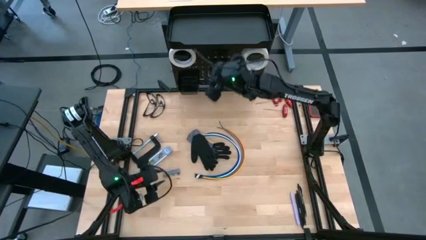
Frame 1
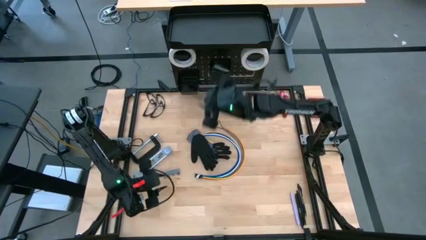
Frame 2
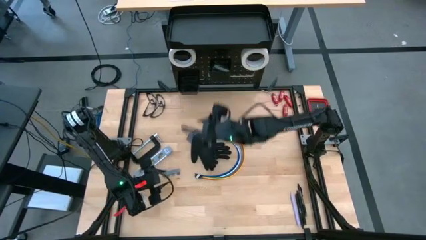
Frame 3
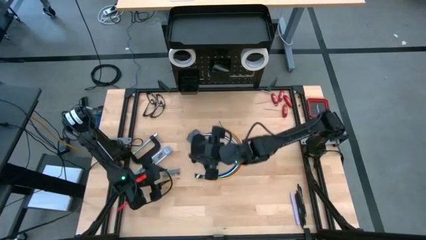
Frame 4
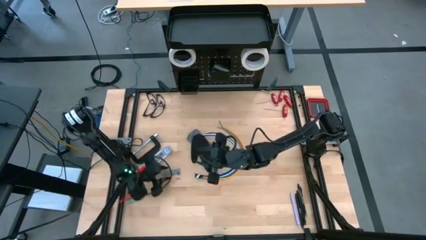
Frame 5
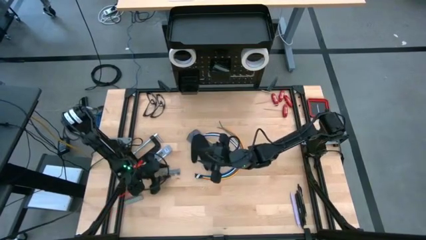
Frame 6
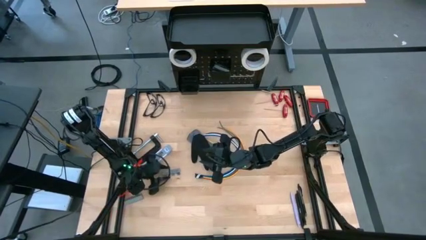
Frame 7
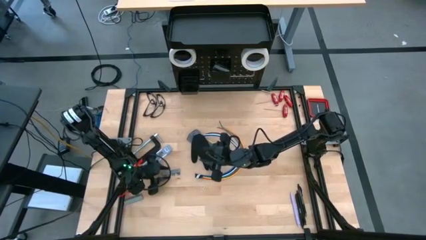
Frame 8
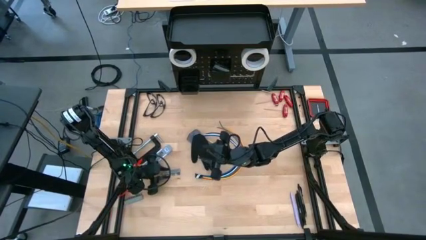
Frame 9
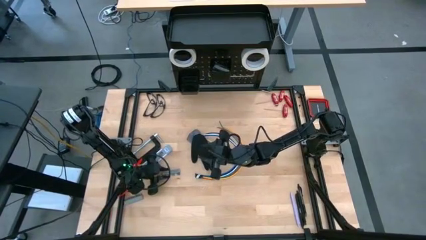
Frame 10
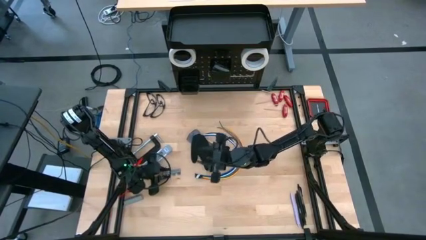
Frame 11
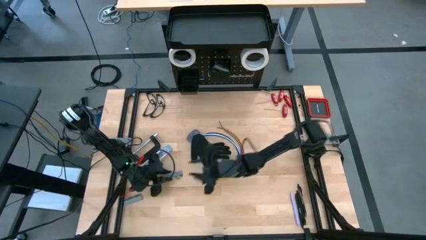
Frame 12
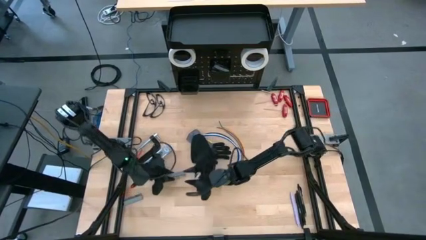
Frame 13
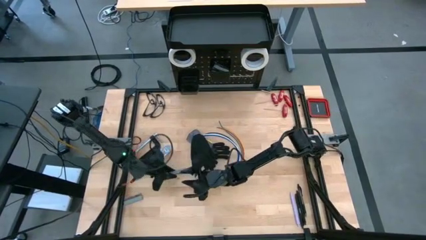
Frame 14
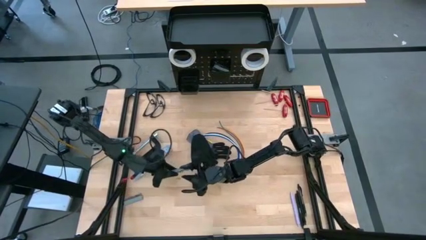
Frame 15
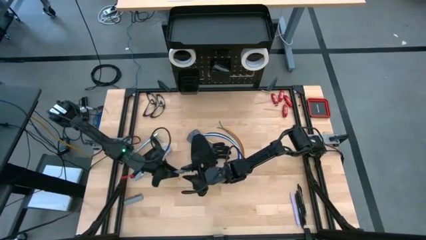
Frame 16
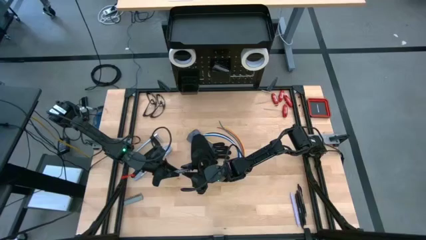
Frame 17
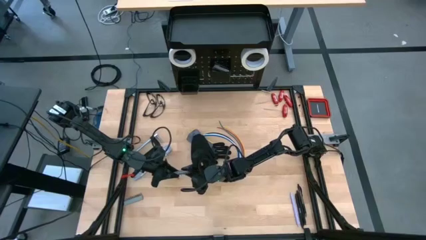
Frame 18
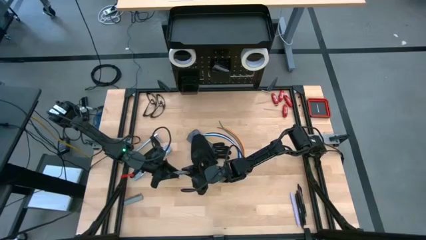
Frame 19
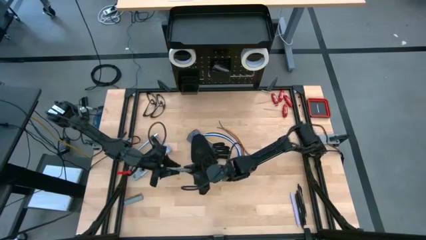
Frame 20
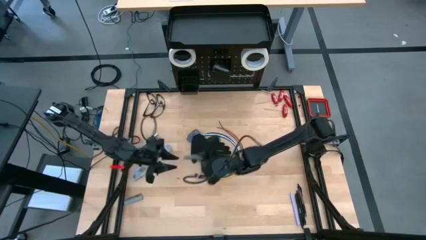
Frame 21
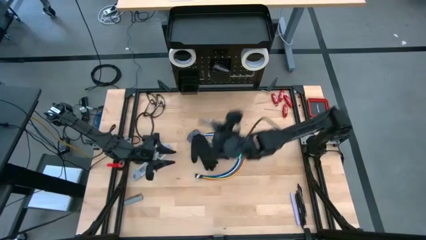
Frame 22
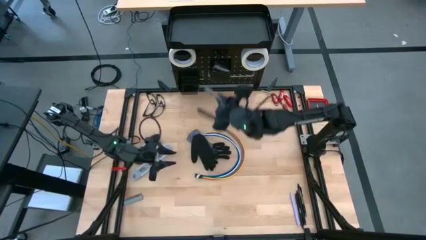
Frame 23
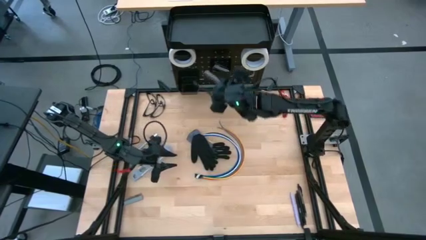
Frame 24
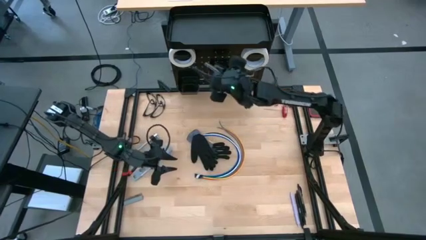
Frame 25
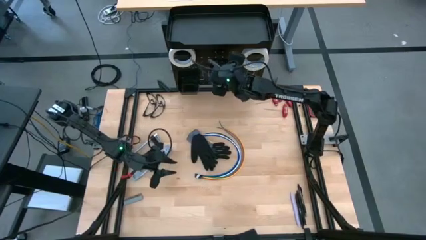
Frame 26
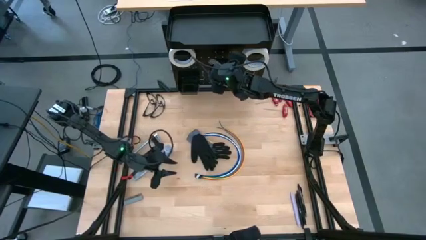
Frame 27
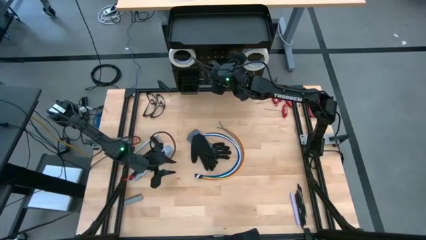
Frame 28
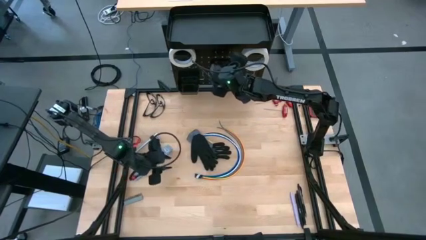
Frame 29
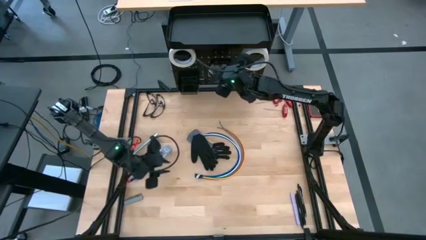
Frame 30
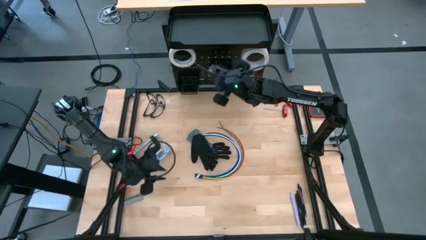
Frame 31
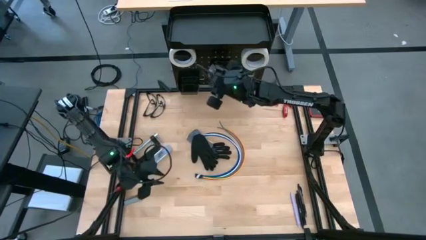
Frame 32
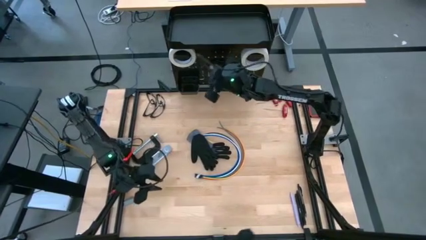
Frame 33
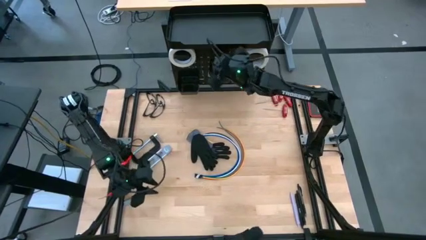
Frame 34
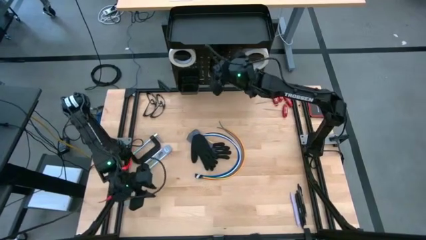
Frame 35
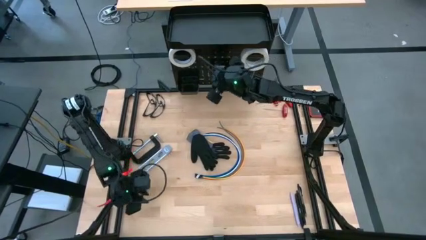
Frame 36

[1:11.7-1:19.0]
Task: Hang tools onto peg board
Put the terminal block into the black bin on the peg board

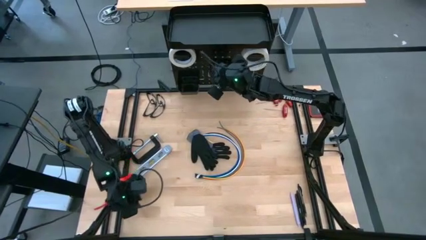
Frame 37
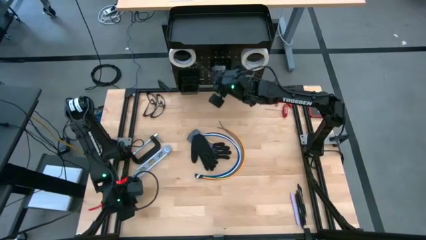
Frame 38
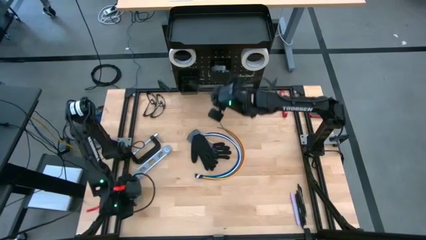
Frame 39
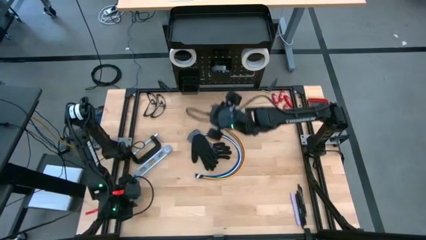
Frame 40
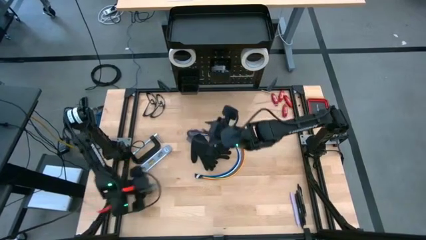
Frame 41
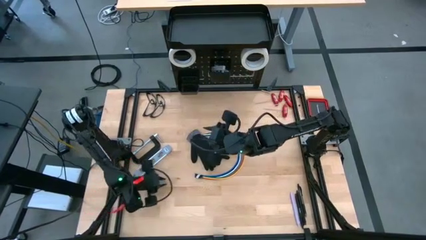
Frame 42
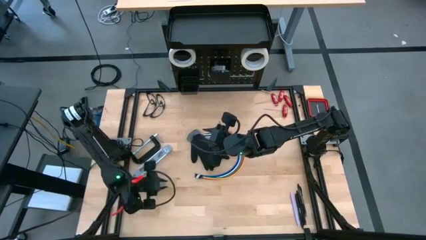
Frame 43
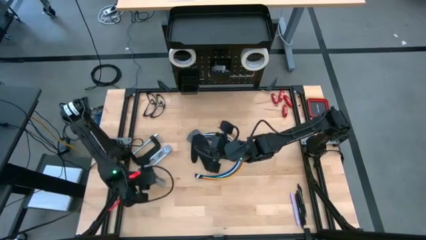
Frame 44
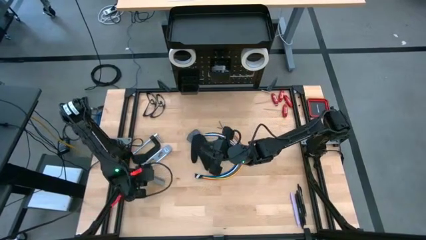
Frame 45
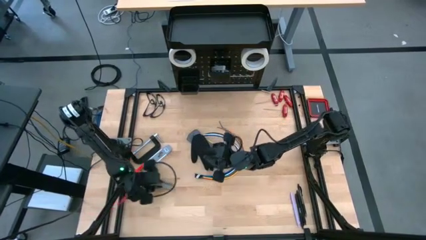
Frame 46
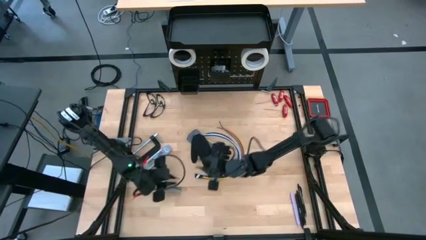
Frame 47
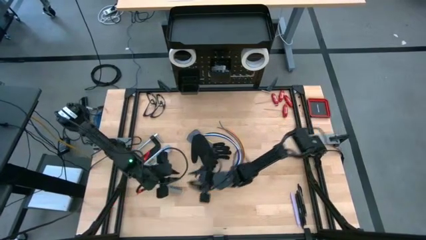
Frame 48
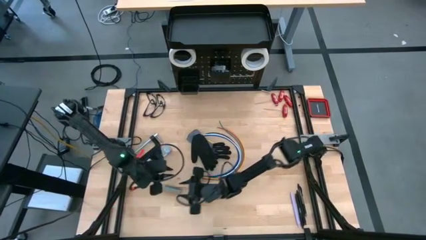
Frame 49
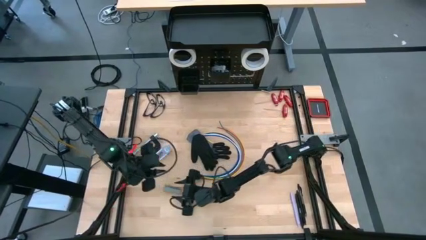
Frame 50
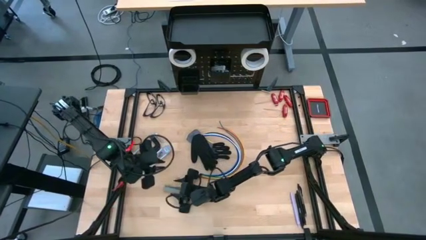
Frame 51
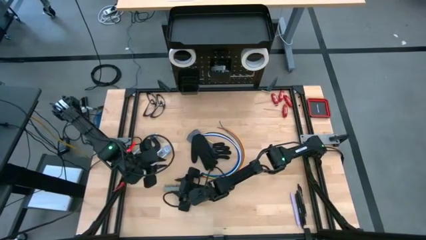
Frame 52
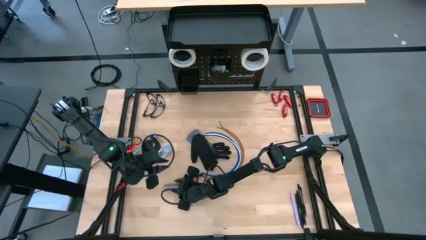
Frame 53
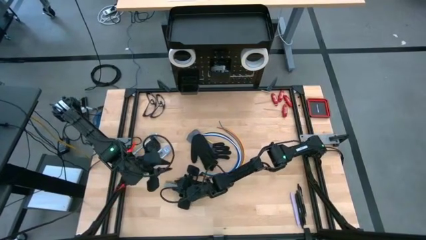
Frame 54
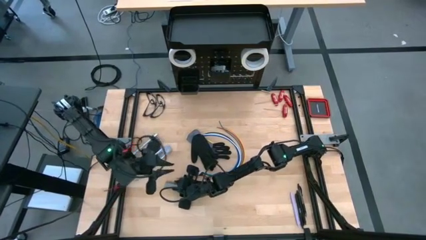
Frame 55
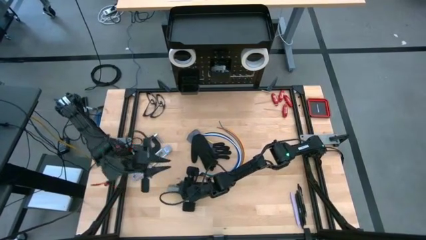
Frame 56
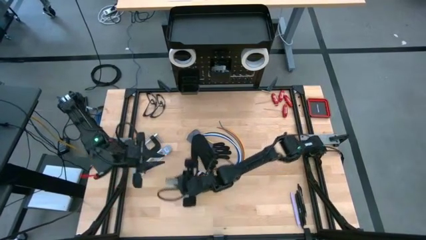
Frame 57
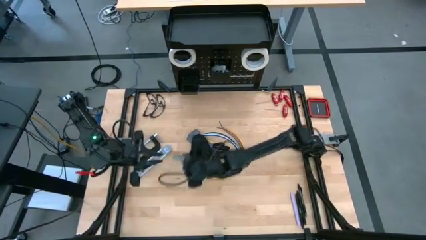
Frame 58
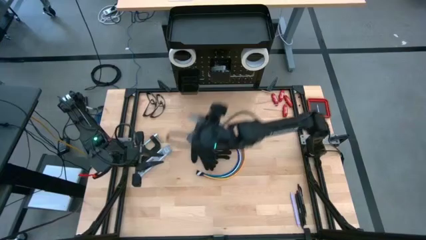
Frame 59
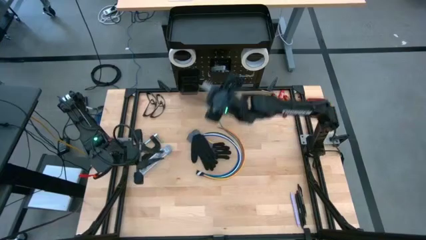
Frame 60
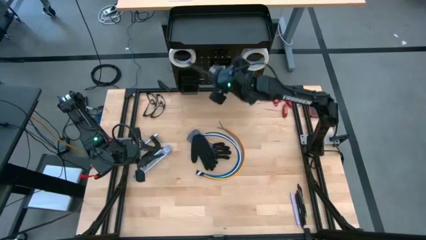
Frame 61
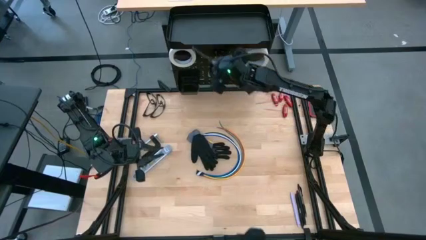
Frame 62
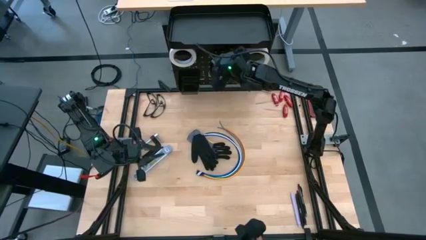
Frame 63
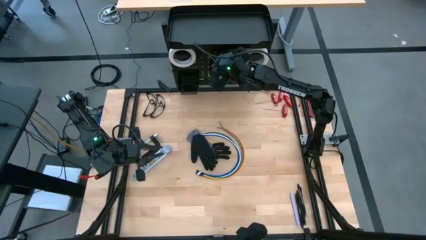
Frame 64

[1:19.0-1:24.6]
Put the terminal block into the black bin on the peg board

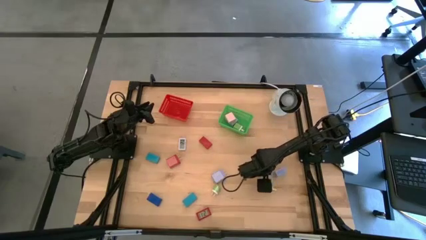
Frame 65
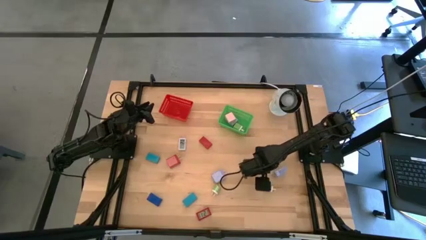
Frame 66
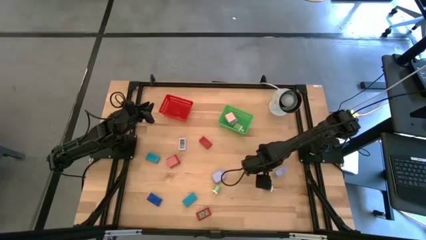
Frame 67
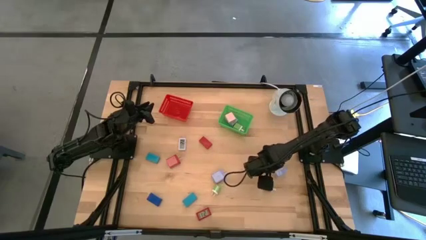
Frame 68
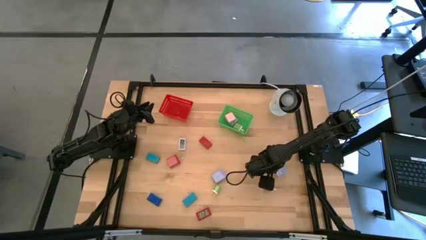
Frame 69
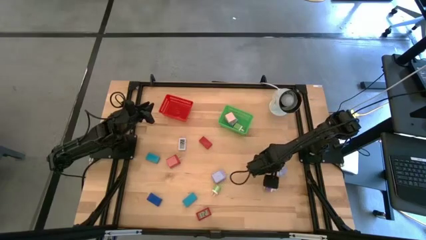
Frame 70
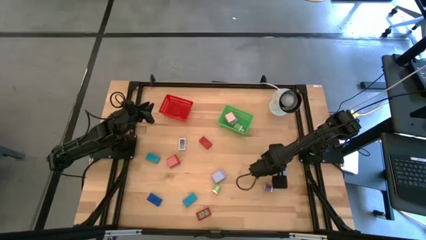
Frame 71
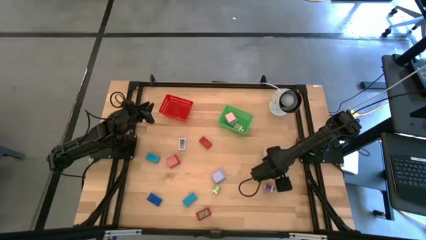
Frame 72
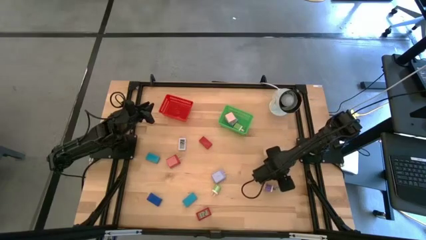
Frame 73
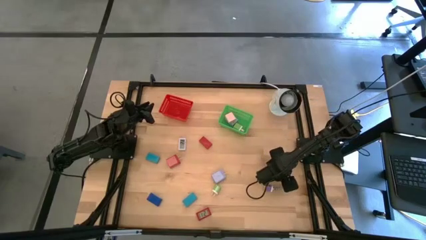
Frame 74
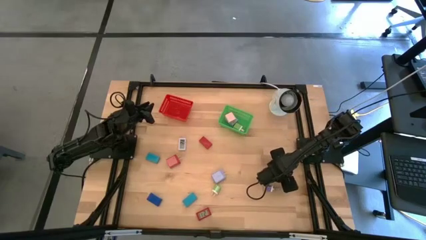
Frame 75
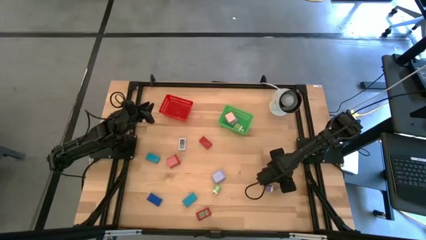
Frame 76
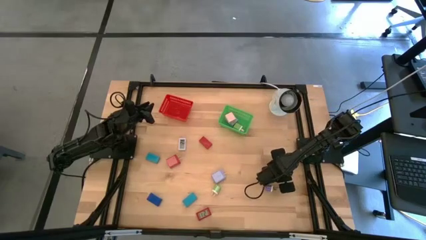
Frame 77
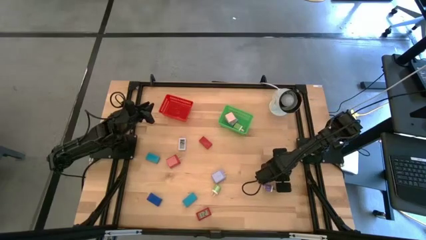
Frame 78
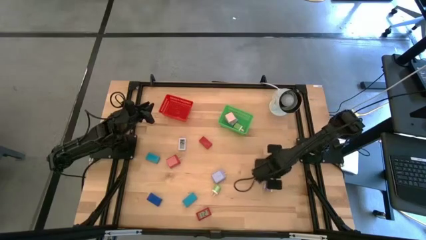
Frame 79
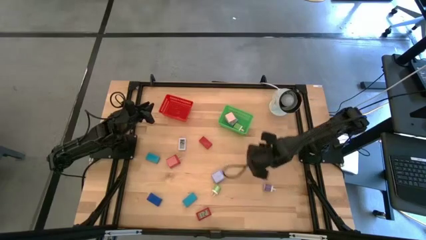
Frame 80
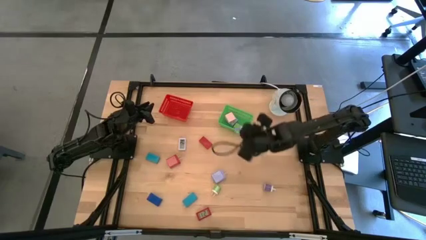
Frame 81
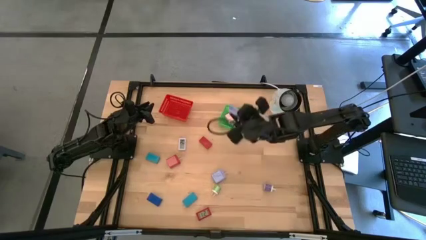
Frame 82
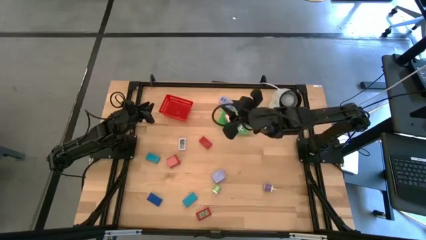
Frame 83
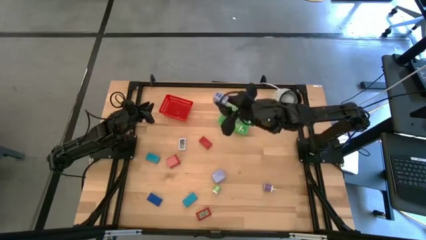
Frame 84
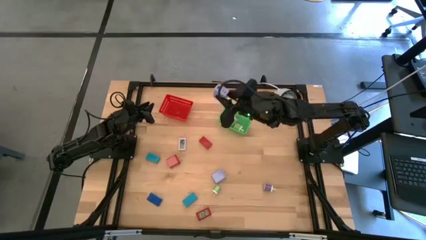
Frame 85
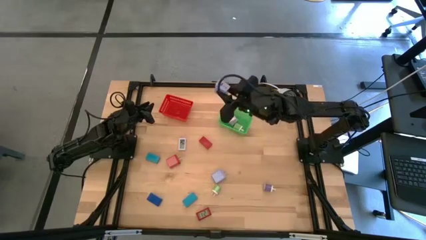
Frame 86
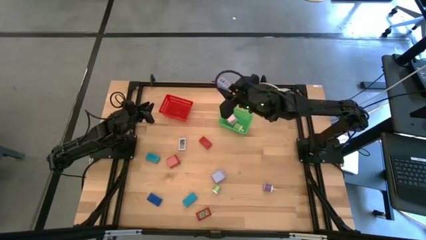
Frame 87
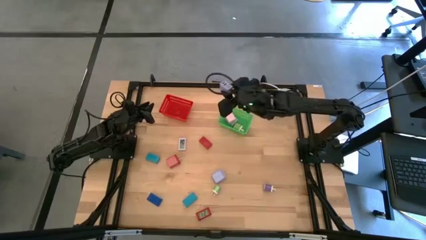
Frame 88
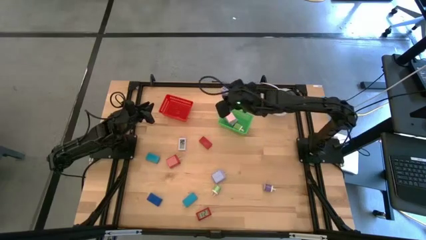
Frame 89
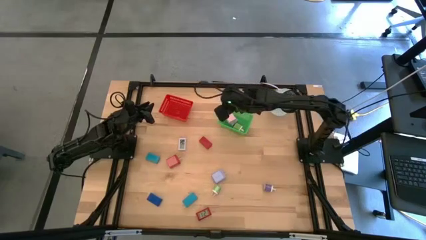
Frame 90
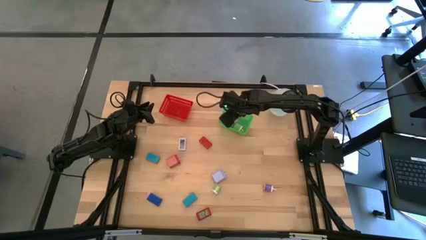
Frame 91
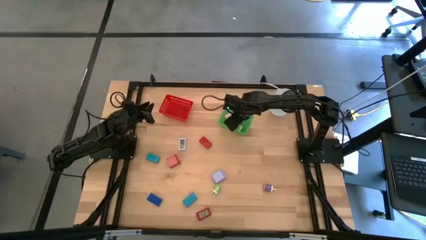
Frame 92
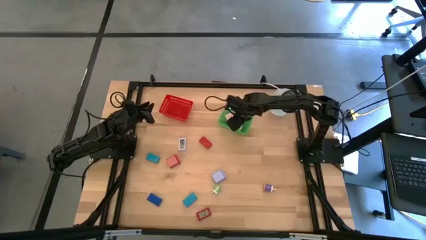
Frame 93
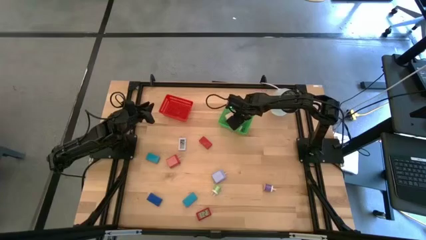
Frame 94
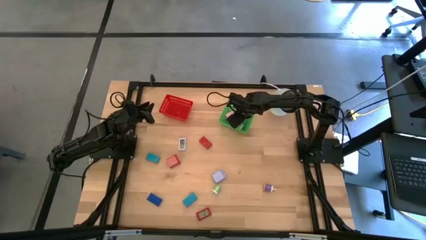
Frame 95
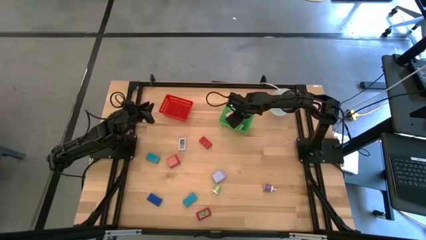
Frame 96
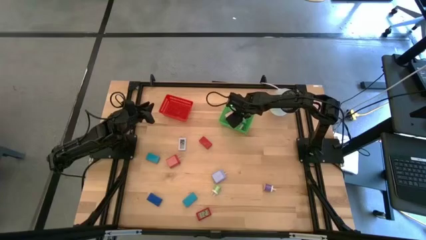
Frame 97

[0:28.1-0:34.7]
Task: Pick & Place Office items
Put the right light violet charger adapter into the green bin
